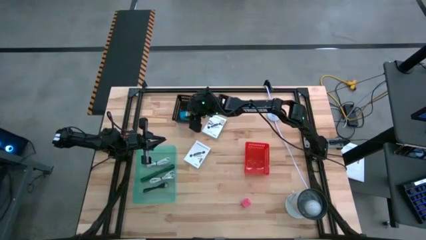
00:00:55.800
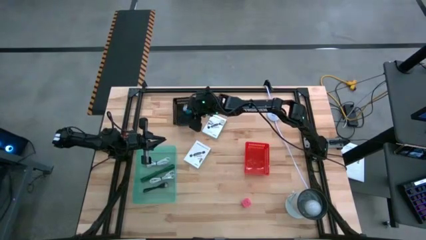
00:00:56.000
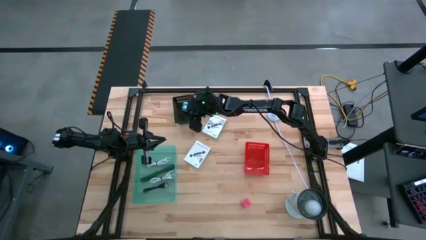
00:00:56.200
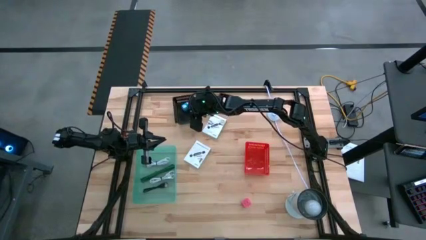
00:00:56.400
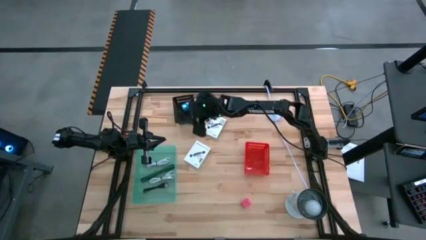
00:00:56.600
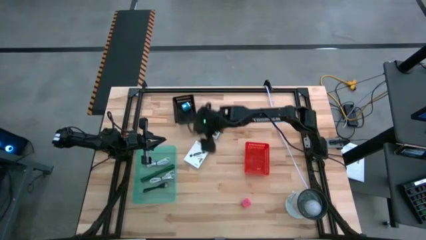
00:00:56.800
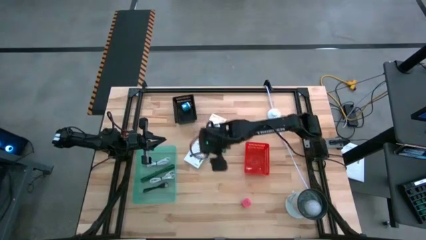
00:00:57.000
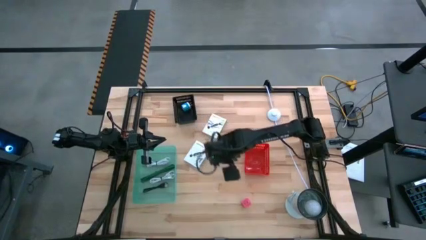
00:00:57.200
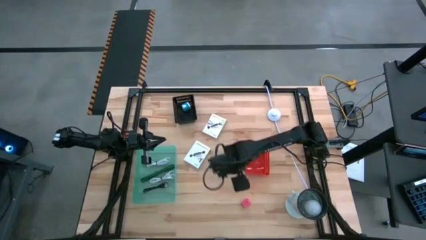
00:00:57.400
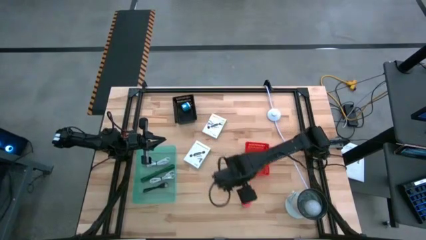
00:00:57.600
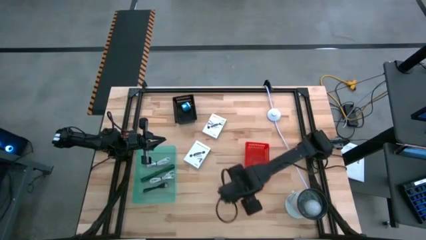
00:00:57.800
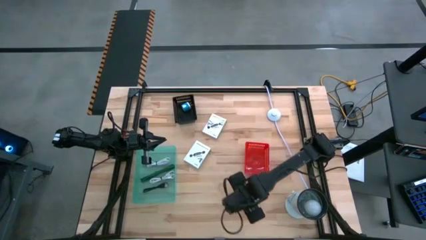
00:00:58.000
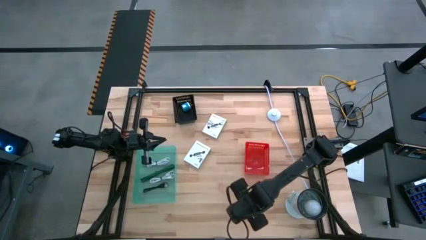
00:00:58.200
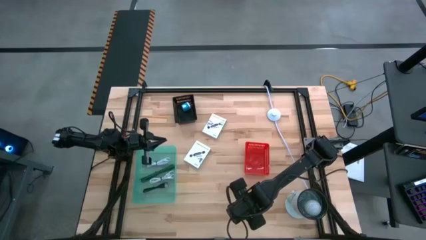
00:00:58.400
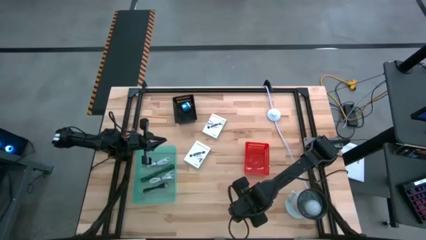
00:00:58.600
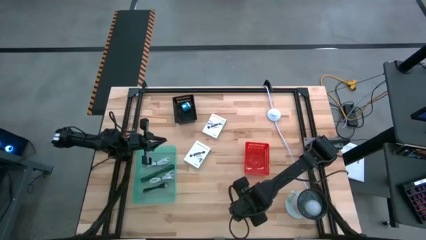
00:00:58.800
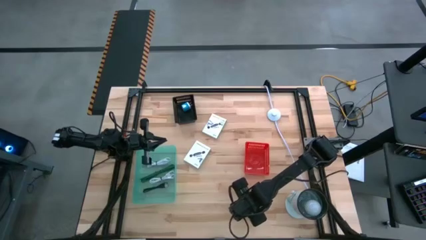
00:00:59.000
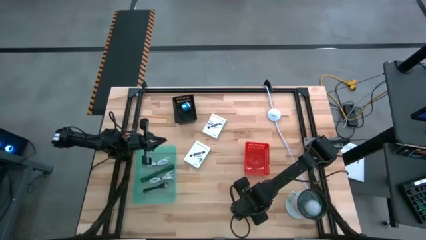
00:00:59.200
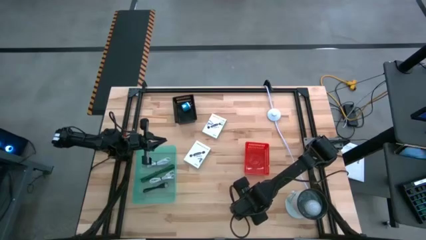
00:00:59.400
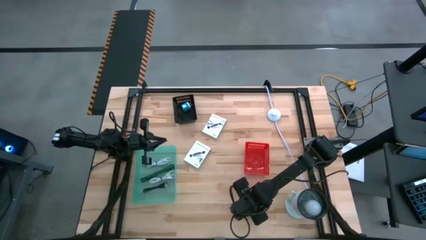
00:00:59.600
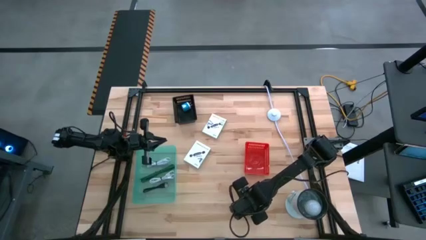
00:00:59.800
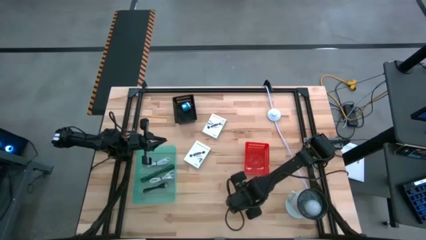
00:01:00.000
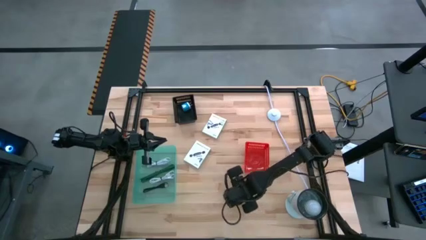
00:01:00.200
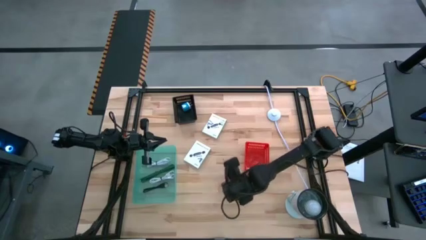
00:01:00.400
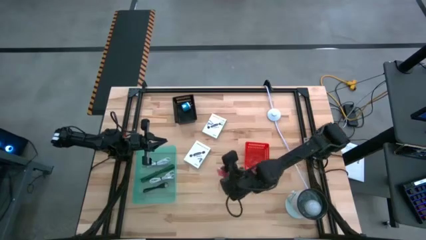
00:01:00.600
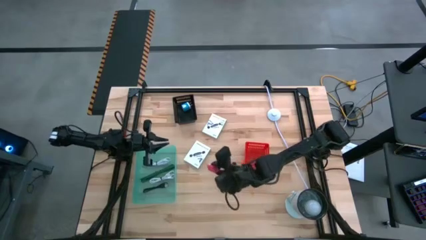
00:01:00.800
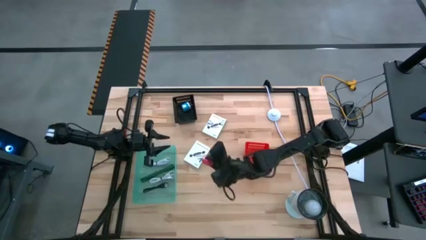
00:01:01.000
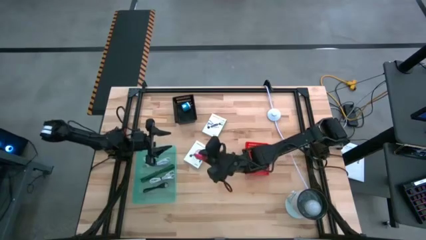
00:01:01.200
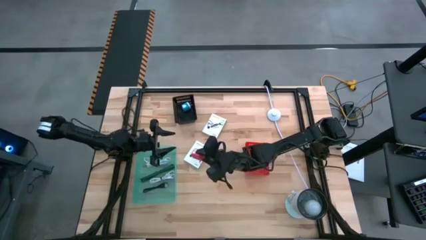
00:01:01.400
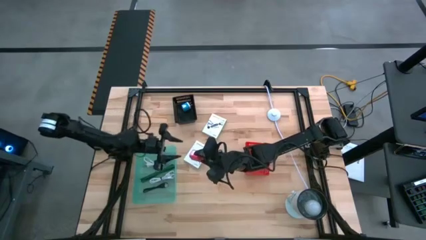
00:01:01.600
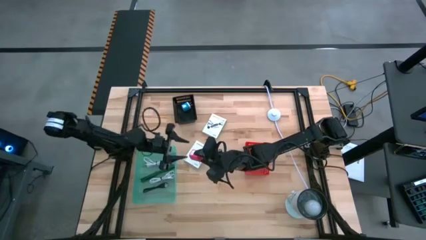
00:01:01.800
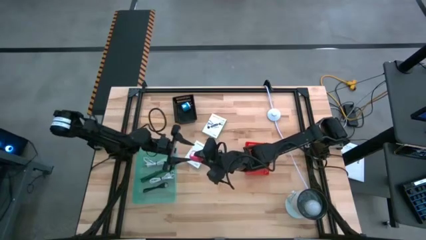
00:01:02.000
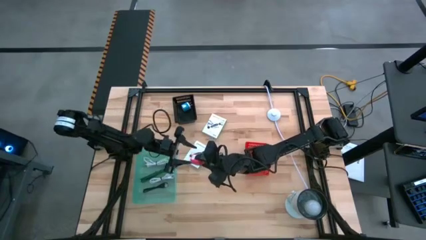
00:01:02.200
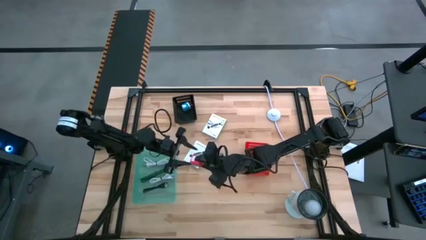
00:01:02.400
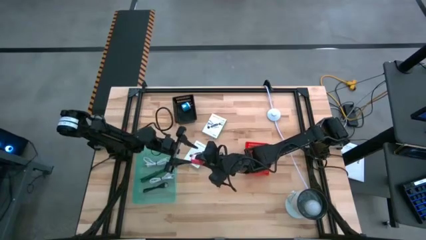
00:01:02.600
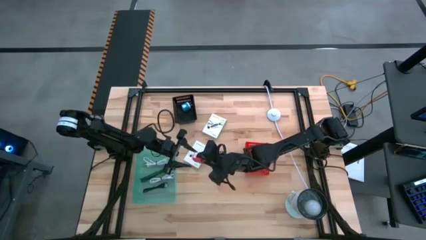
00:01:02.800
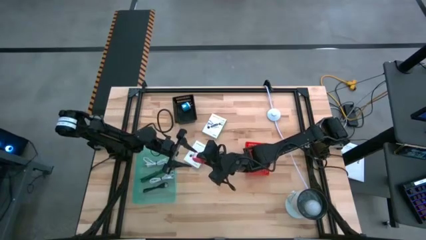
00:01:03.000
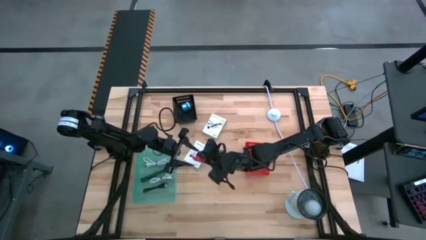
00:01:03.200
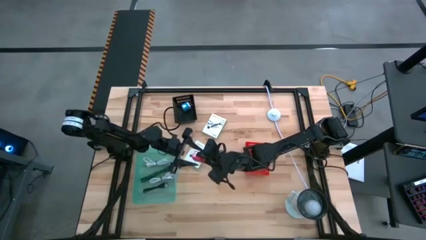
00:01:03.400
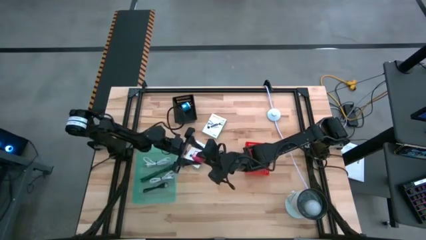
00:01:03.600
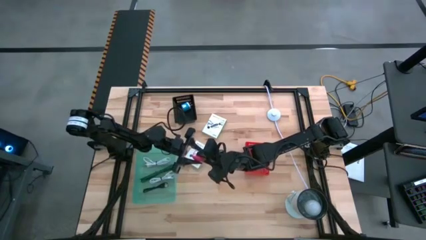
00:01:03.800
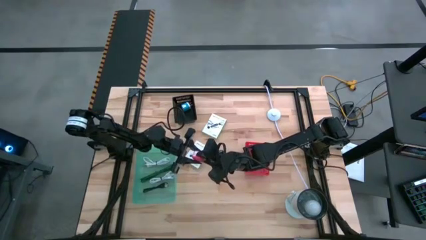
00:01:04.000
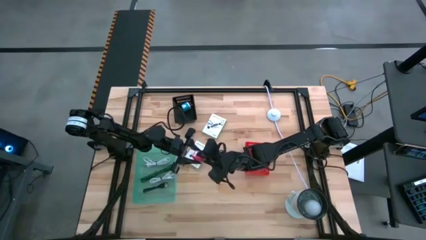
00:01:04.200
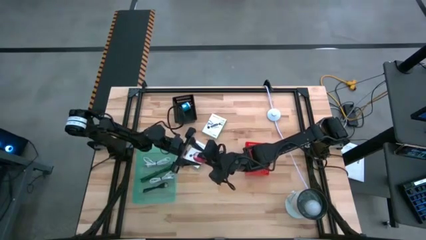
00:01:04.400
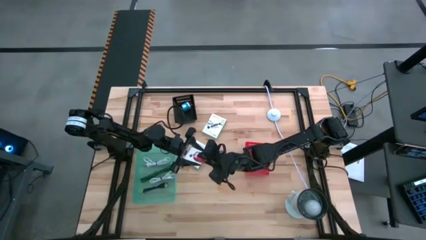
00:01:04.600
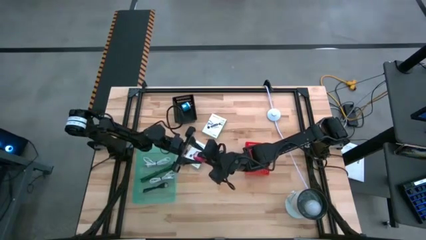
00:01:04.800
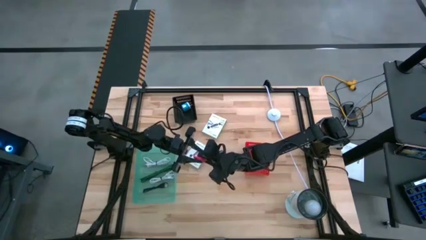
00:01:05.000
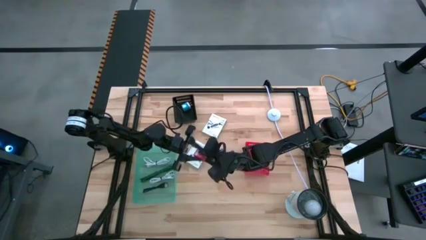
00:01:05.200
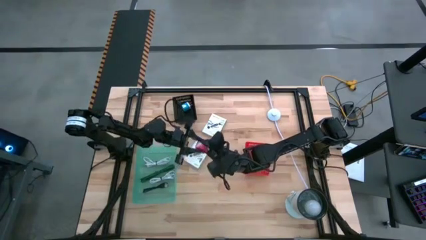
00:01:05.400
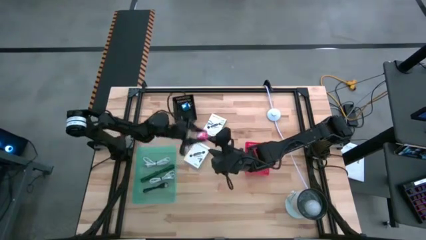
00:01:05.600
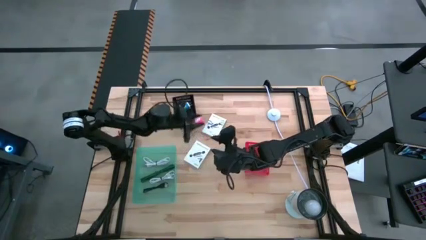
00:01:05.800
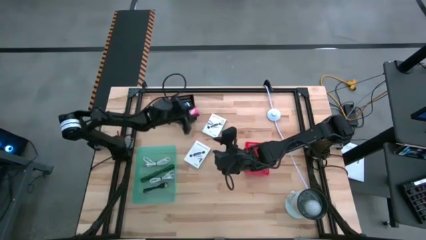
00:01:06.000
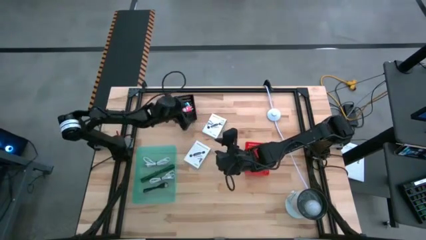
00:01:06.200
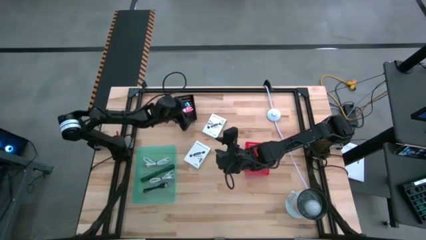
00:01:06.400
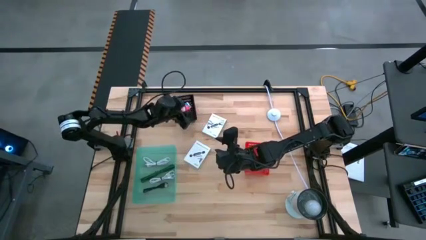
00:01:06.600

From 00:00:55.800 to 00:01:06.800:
Task: Pick and place items into bin
Put the pink adapter into the black bin

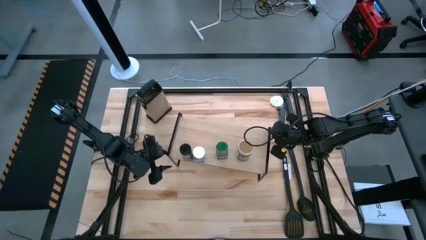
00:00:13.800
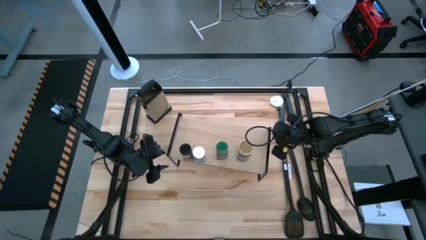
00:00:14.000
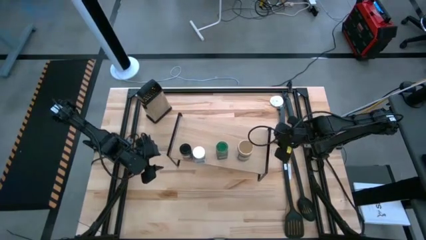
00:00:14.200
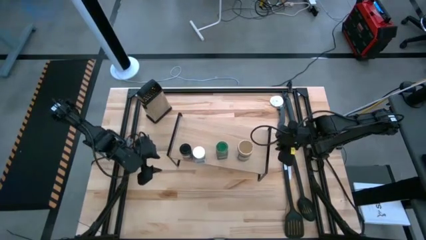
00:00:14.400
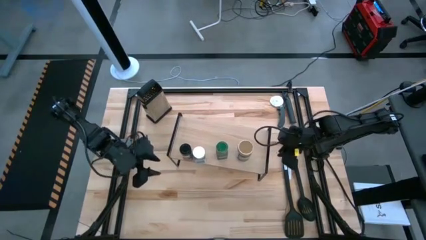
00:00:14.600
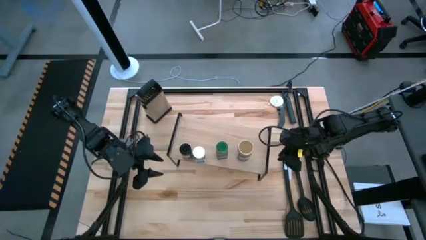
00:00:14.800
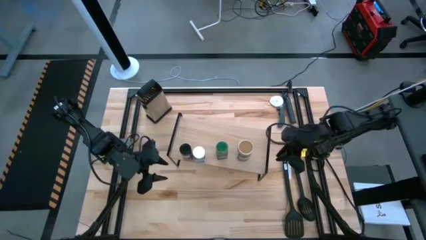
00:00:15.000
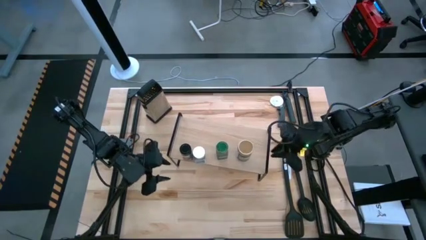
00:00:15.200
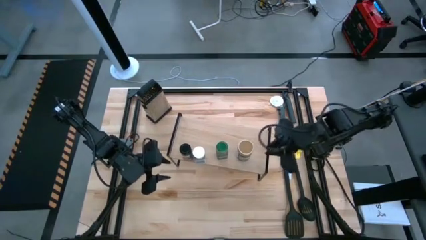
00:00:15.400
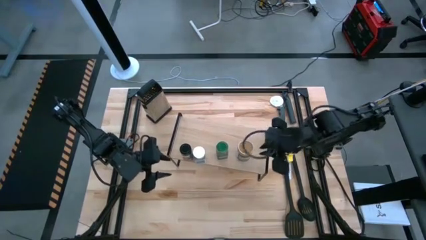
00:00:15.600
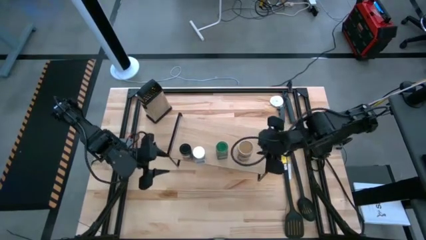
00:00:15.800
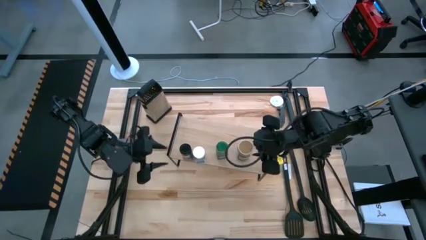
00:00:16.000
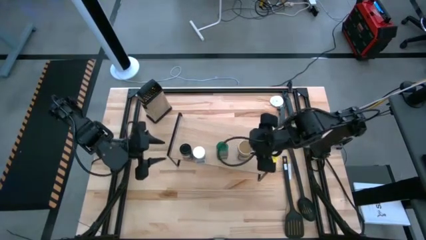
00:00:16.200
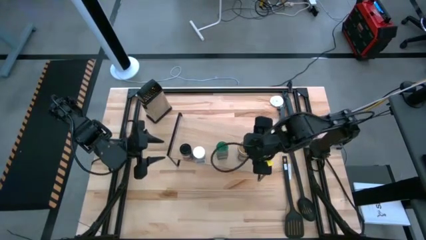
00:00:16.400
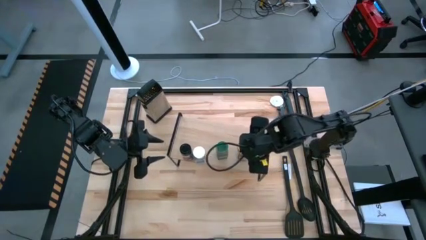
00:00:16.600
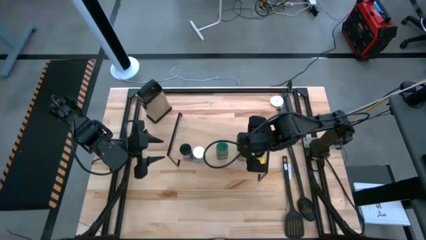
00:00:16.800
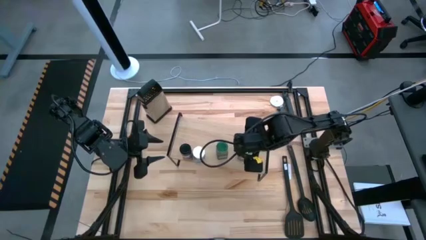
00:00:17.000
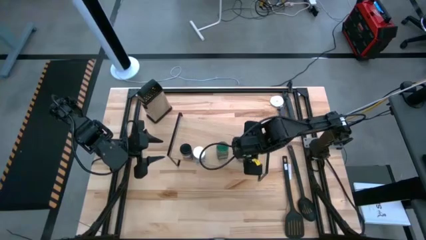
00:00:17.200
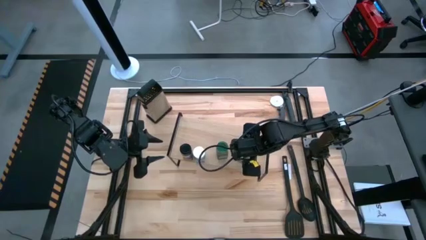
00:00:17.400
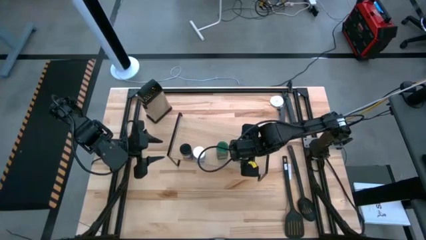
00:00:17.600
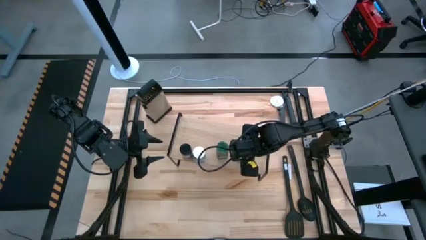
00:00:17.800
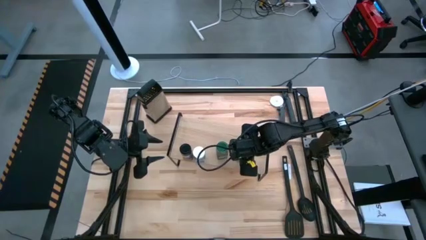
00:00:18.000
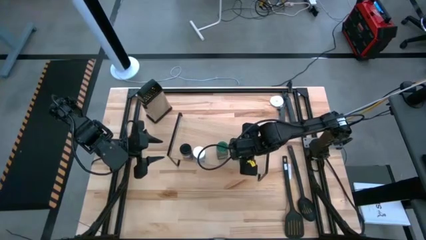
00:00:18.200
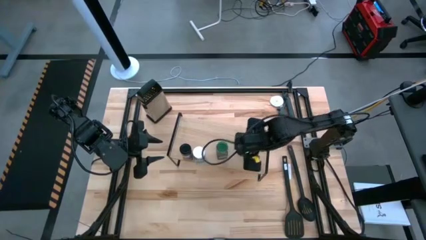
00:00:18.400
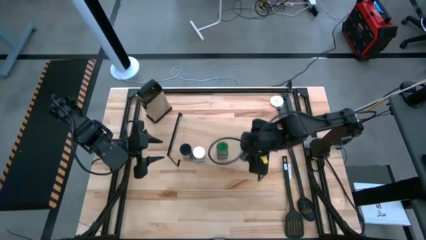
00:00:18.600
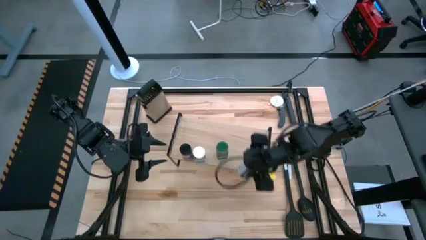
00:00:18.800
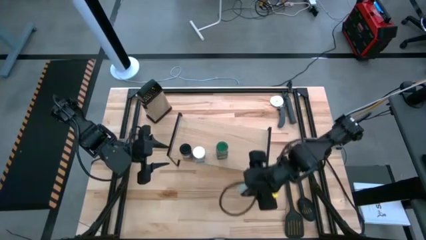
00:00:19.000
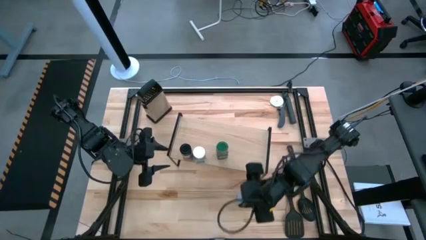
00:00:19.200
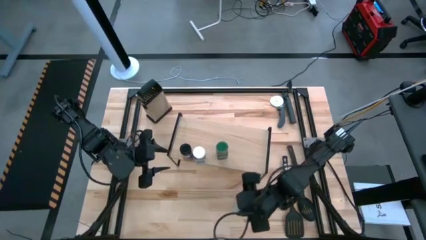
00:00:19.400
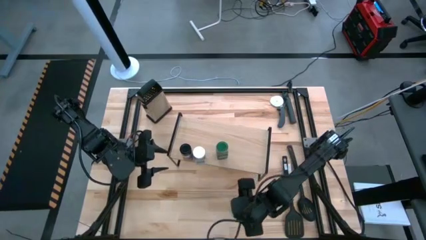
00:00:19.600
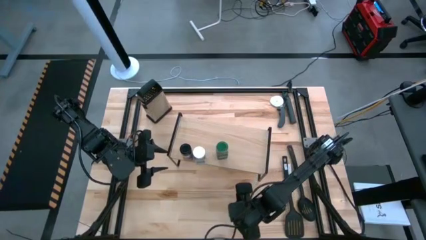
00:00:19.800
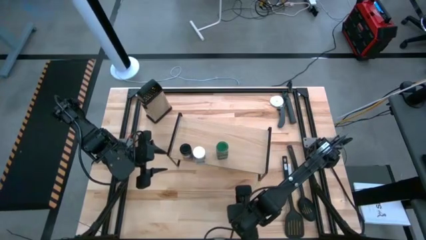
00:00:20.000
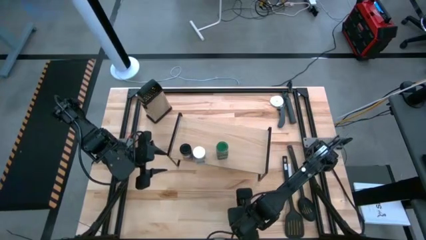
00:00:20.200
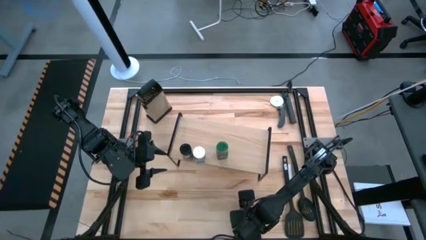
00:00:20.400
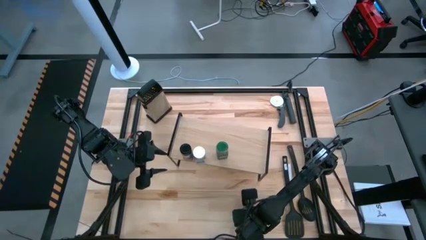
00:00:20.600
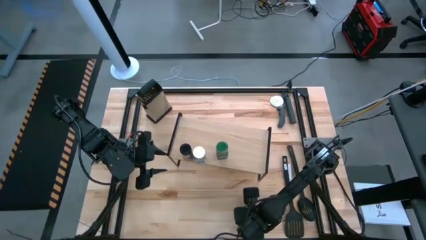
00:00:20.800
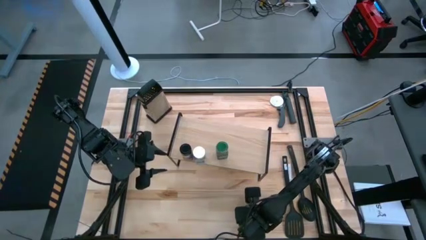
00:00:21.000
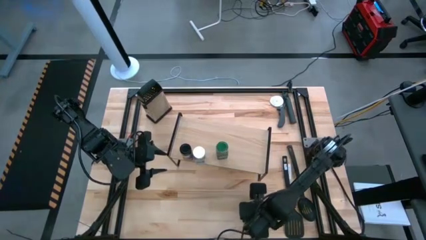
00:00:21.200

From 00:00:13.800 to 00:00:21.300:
Task: Shelf spices
Remove the brown seasoning bottle from the shelf
